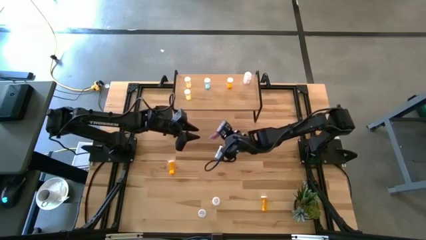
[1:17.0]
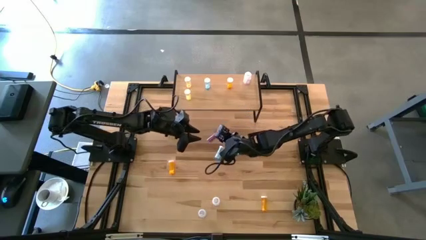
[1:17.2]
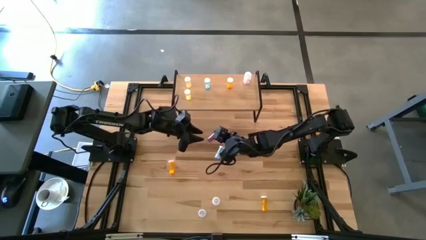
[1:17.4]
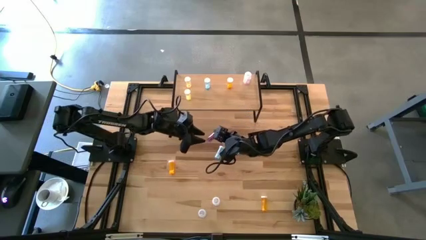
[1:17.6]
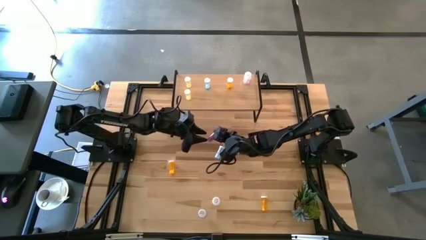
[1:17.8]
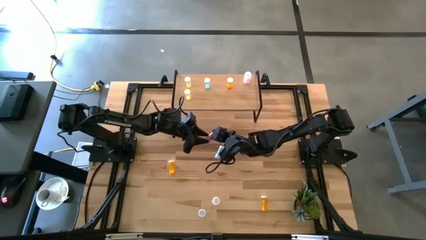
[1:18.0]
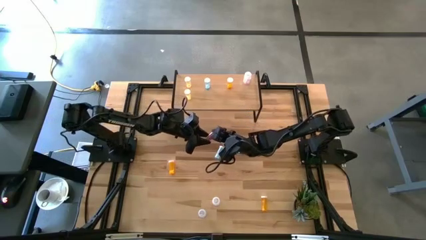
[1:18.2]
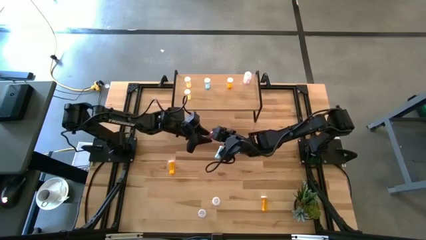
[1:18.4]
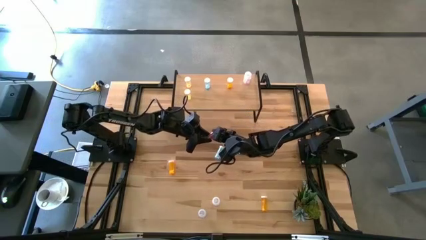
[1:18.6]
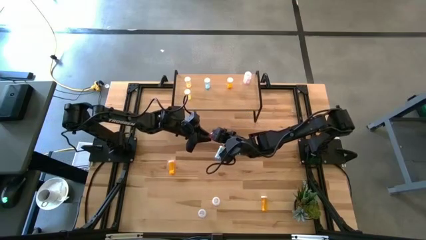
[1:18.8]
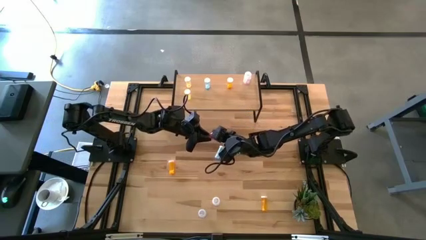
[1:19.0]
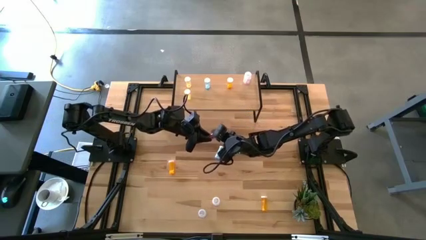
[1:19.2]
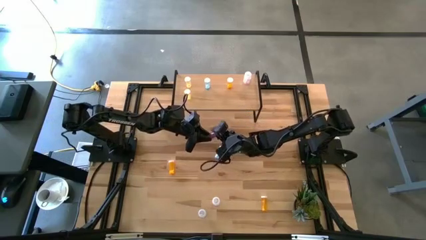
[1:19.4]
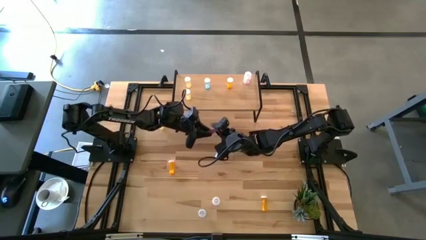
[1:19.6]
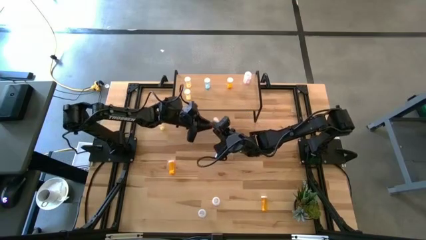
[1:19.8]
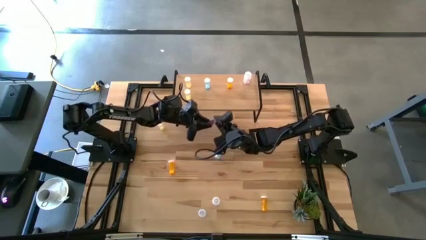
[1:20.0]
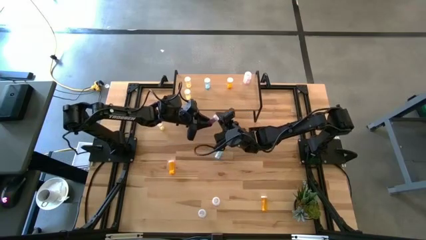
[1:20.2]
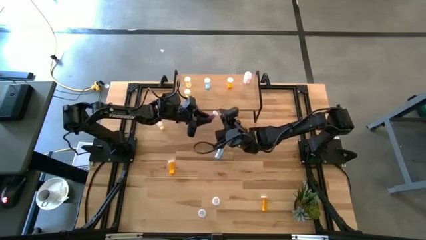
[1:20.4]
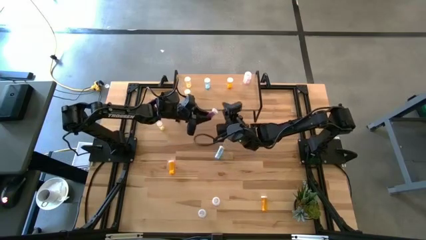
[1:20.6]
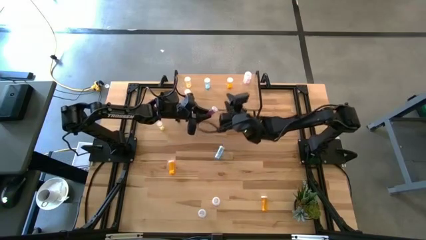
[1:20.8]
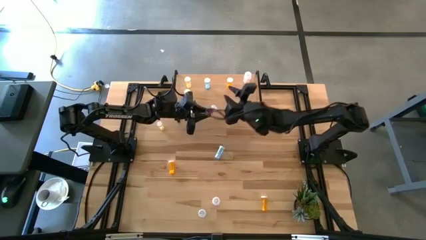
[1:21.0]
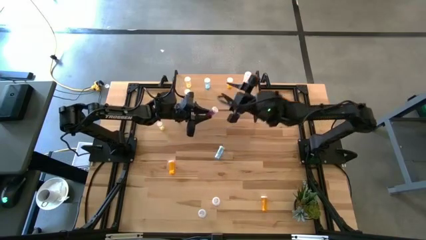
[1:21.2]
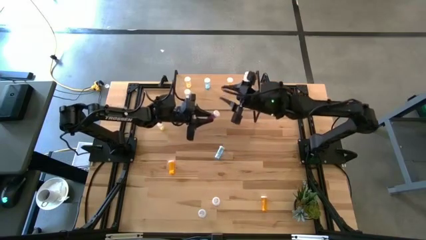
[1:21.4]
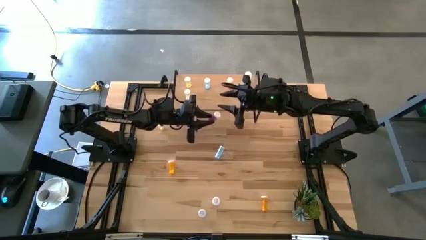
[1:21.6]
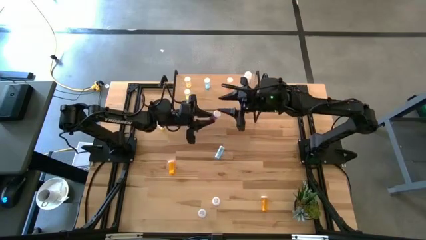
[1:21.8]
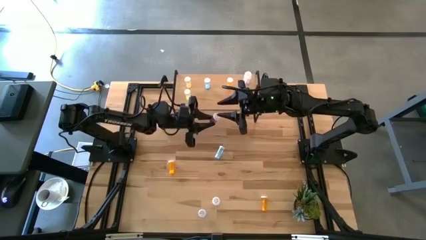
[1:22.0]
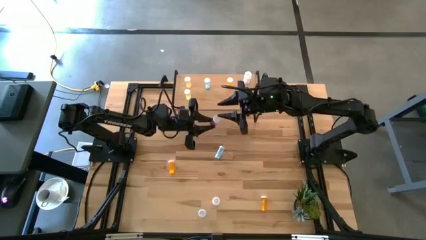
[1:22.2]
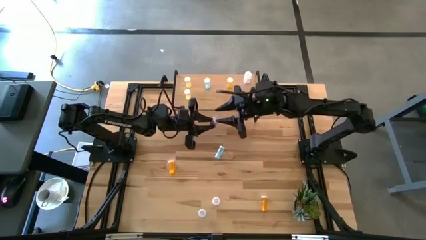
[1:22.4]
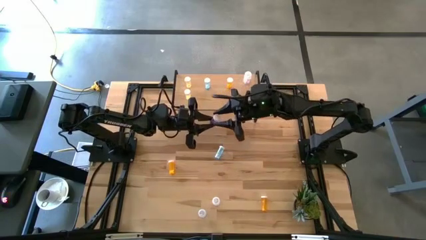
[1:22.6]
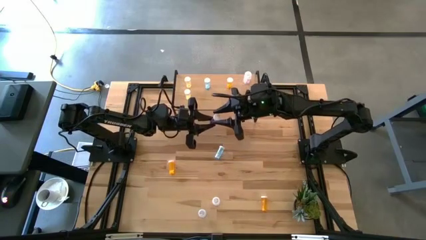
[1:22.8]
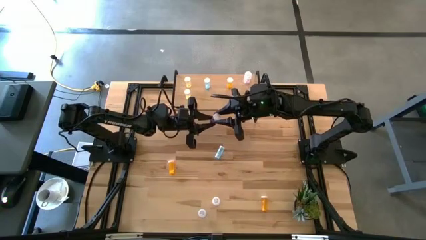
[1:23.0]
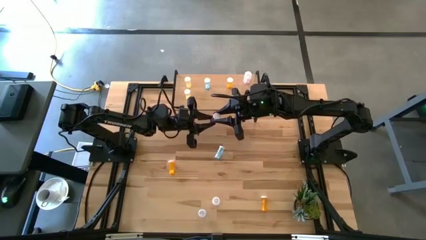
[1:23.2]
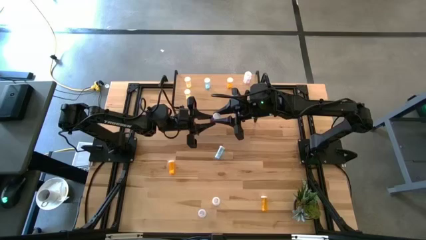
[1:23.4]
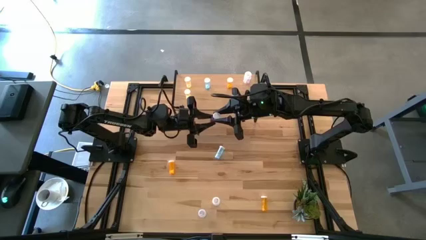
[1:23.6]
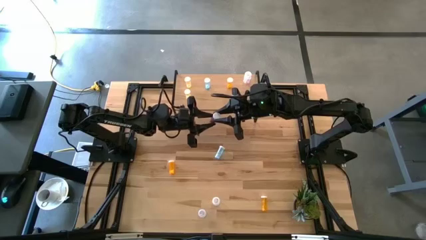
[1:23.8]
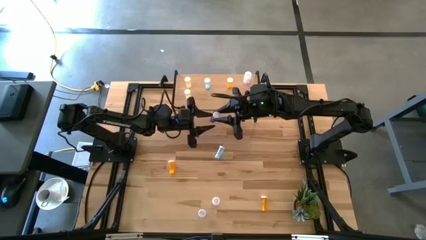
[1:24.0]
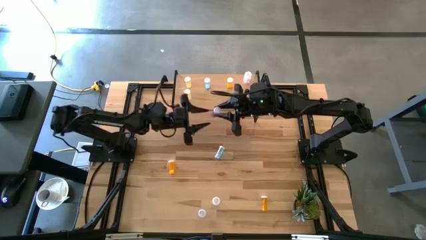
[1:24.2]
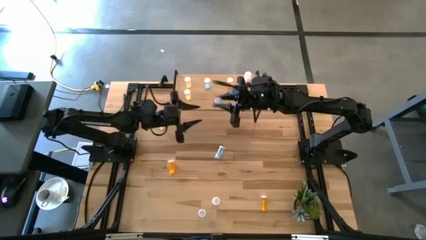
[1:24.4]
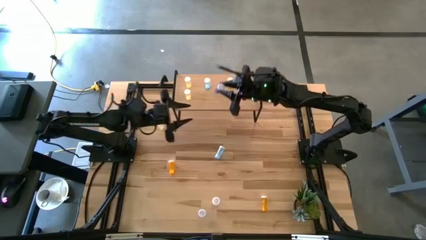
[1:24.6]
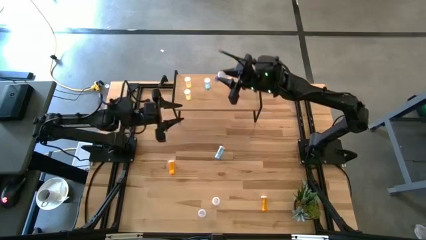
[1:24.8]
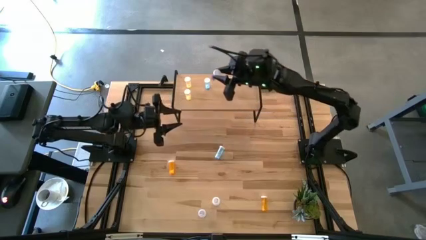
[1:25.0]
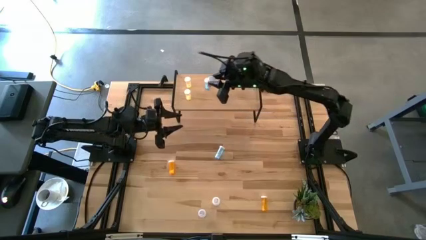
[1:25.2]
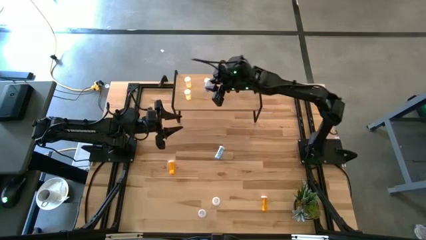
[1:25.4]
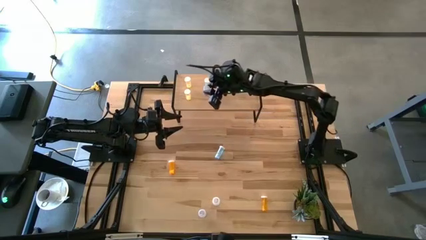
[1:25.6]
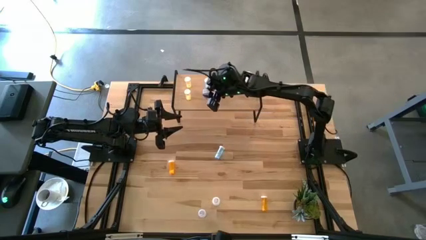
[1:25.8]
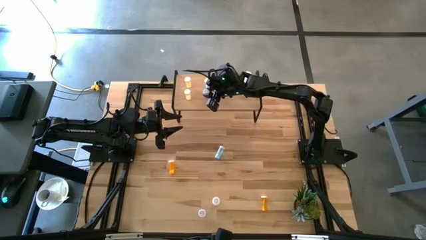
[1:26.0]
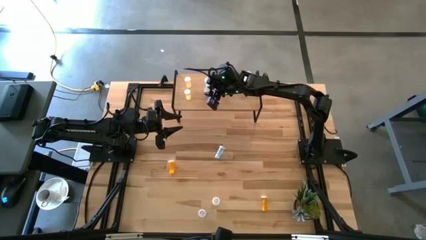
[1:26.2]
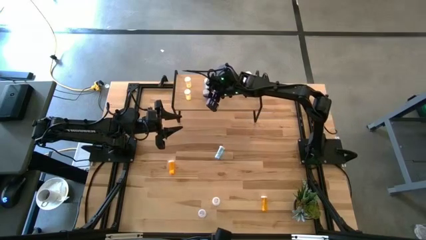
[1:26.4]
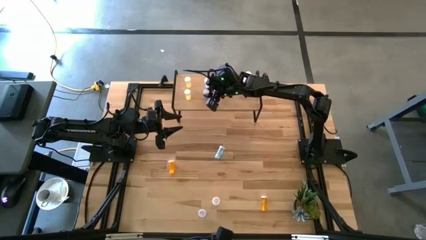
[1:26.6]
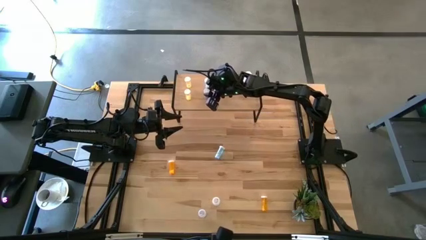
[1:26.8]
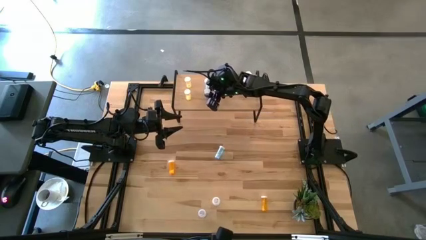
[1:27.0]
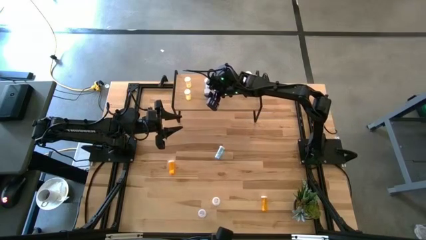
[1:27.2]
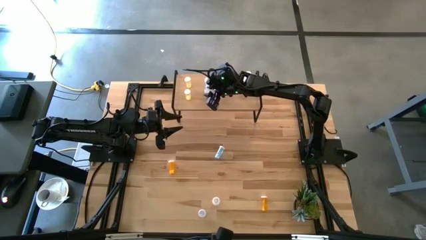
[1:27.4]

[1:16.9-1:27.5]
Task: Pick and place medicine bottles onto shelf by color
Put the top blue pill bottle on the shelf aligned with the other blue pill bottle

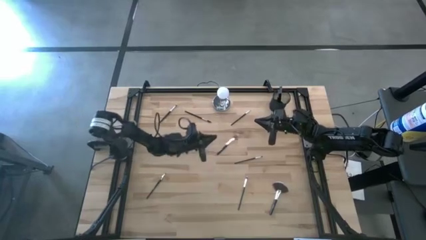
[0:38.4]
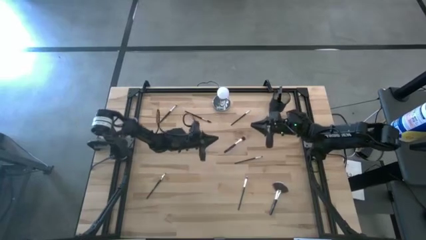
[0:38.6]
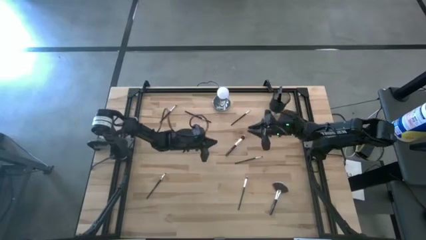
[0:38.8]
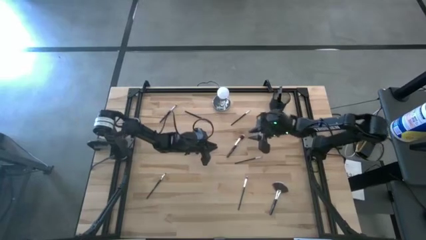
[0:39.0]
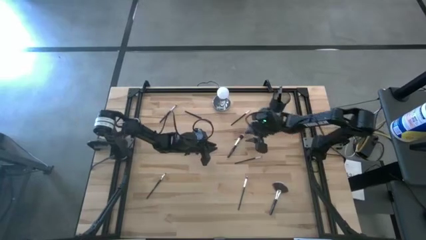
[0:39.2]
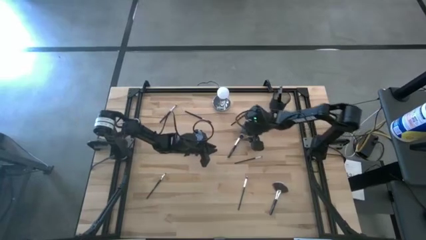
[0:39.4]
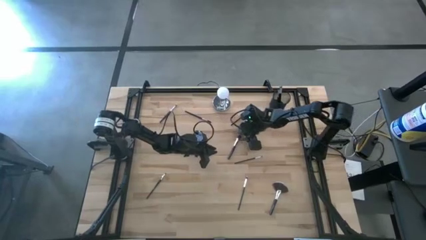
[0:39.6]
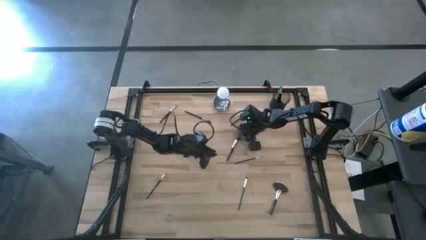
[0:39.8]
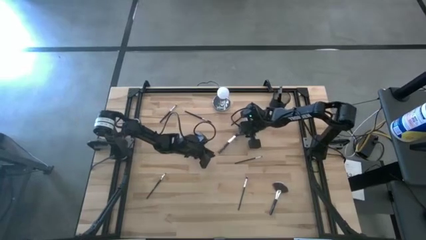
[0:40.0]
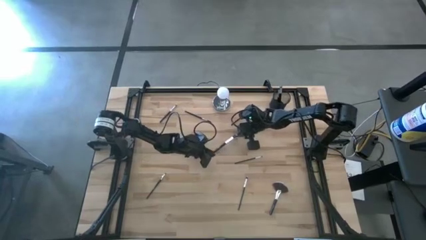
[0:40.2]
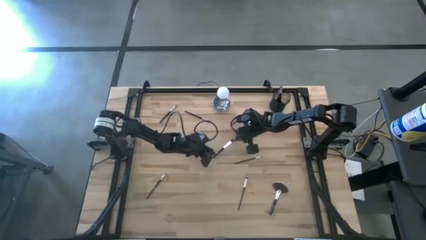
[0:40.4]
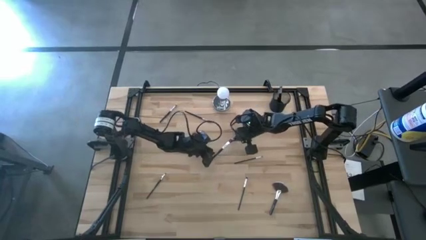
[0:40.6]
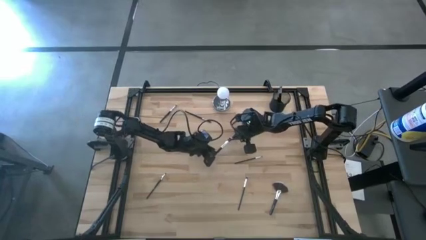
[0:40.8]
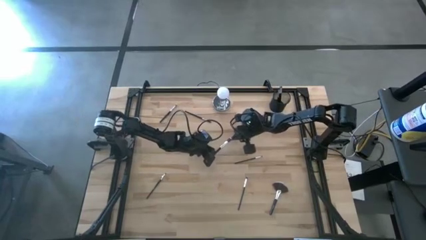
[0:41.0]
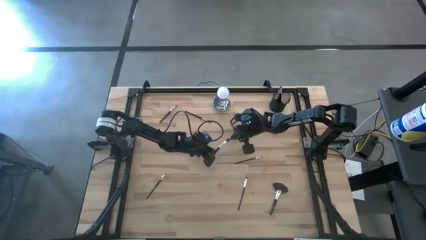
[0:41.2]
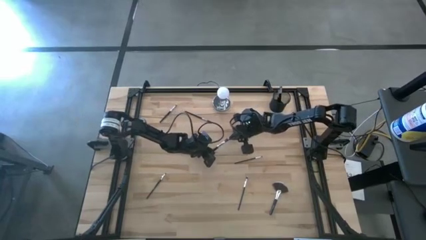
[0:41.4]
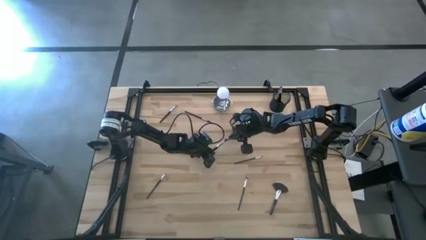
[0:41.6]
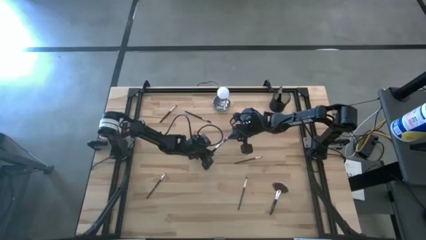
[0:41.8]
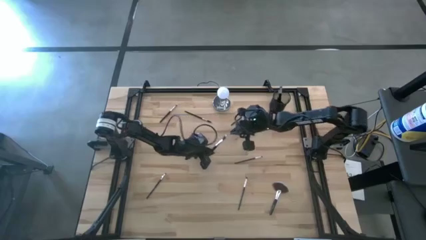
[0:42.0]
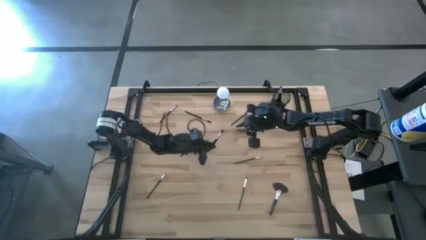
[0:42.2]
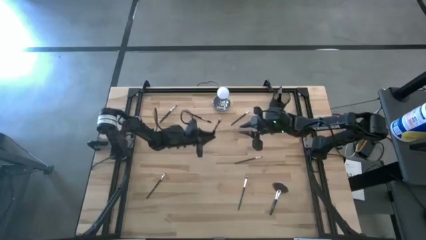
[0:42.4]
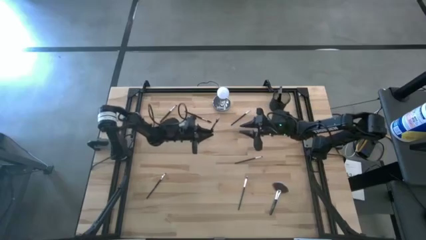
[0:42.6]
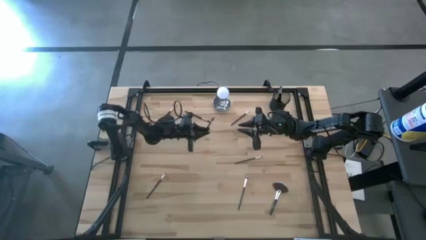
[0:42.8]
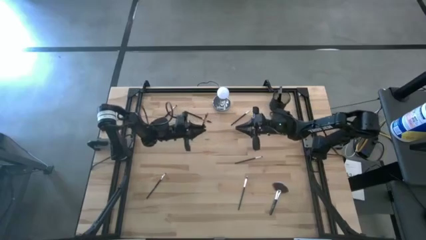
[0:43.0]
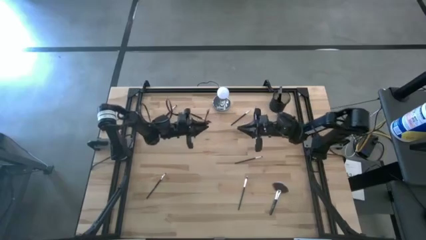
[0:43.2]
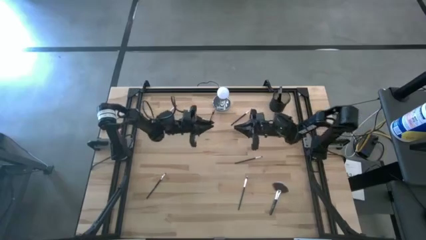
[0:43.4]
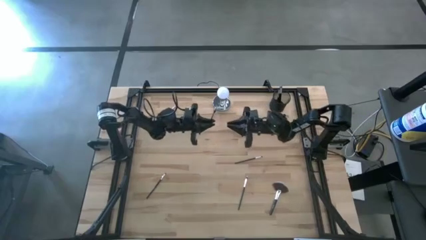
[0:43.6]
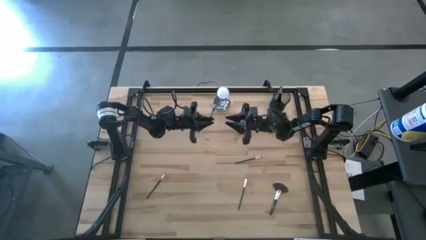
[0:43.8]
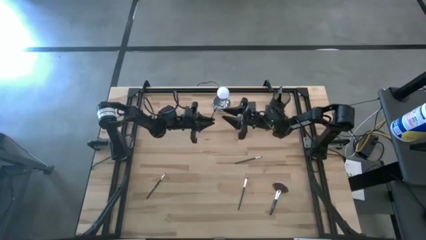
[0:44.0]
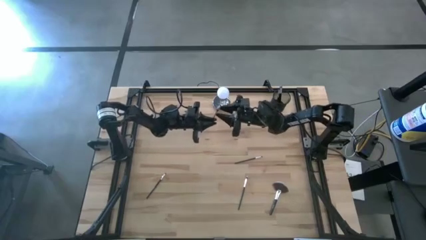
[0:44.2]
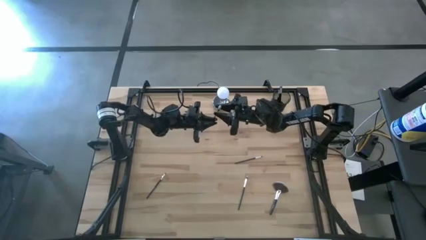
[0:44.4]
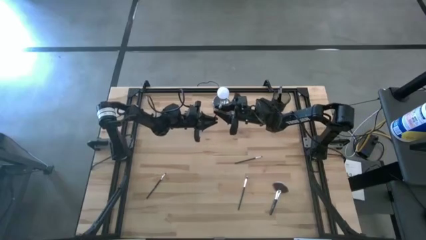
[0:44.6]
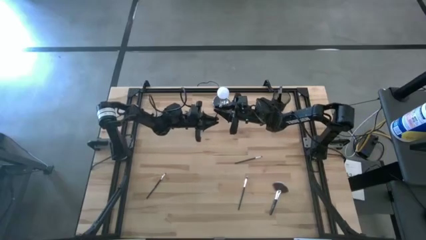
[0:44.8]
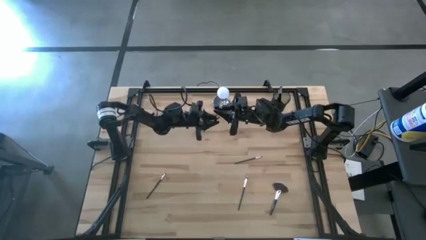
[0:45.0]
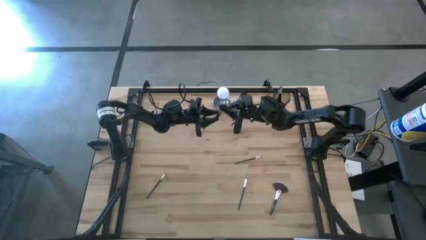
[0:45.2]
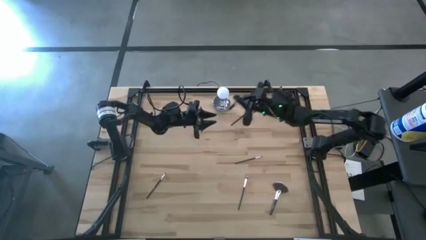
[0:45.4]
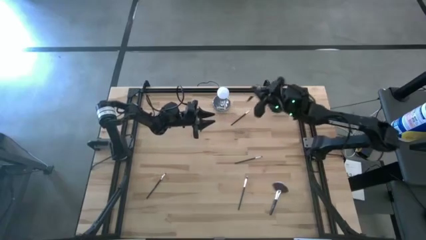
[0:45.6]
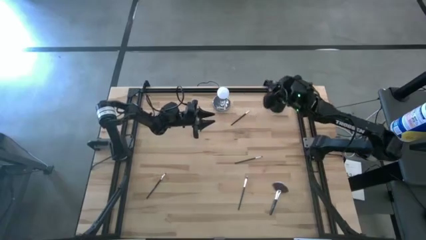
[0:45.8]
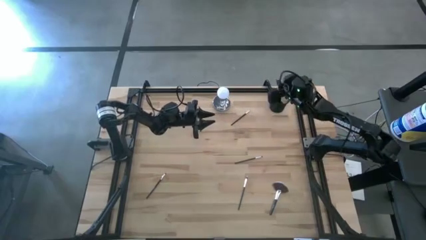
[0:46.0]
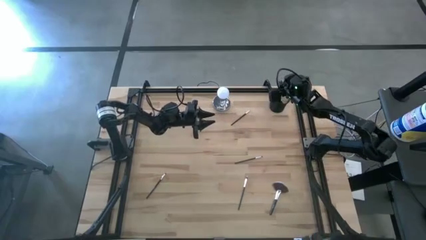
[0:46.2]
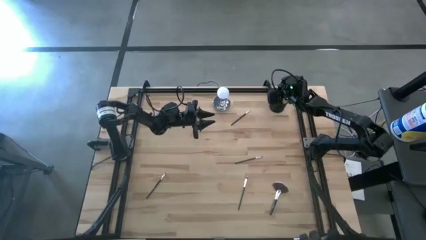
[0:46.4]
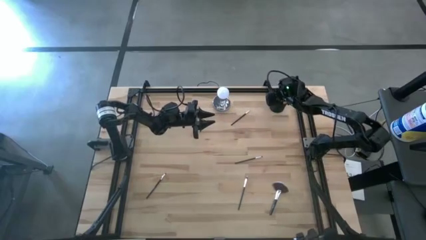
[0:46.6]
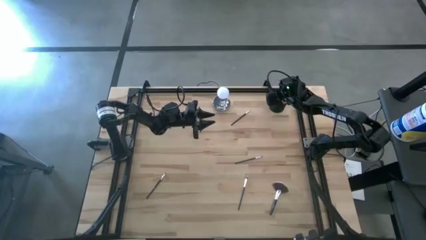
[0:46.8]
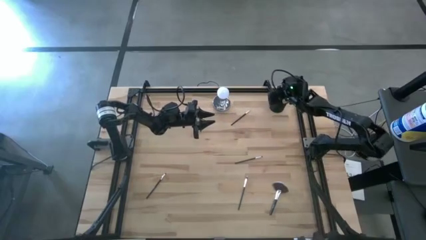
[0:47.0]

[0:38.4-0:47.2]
Task: Put items in baskets/containers
Put the foundation brush into the black pen holder
